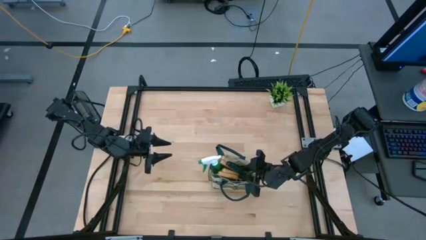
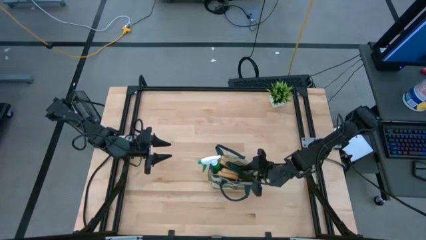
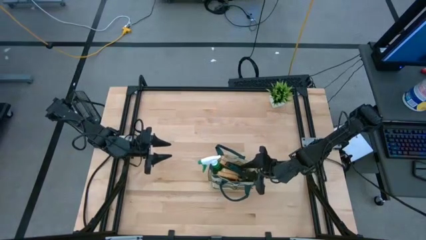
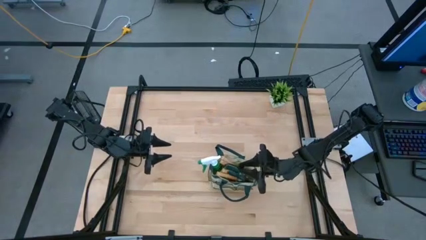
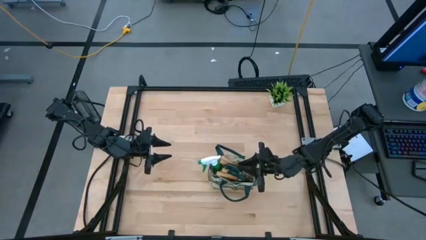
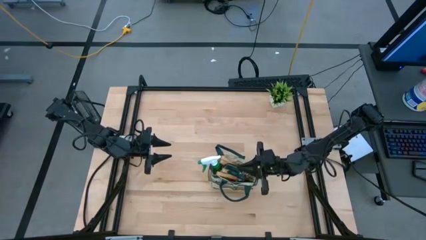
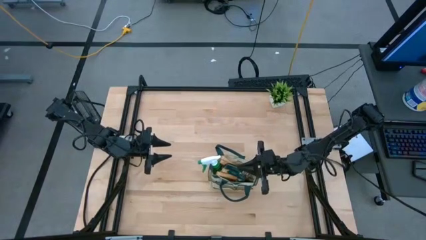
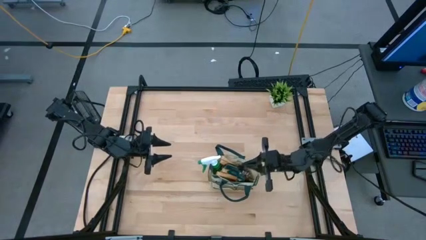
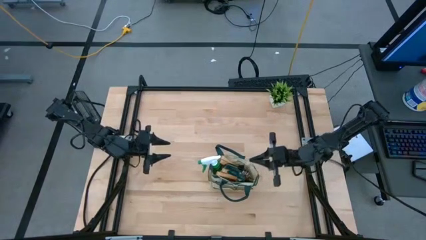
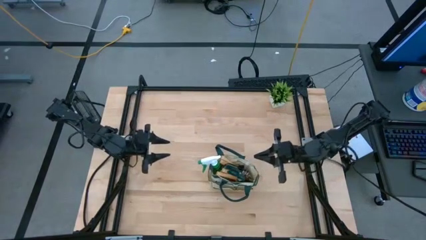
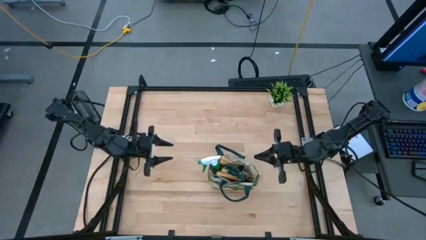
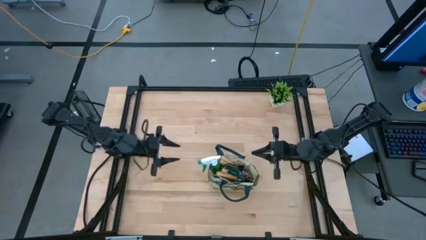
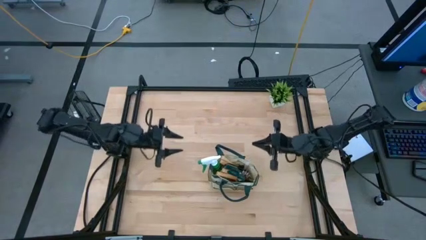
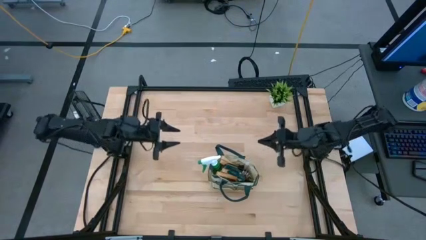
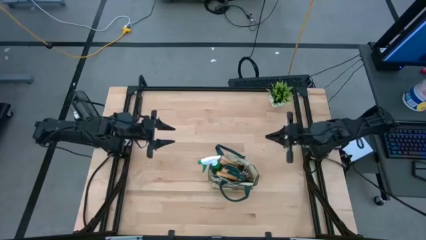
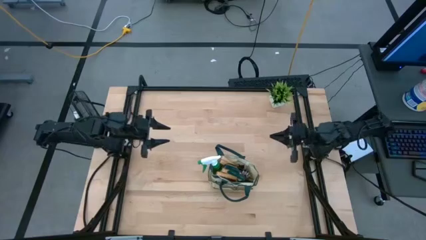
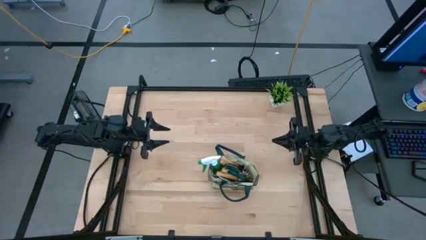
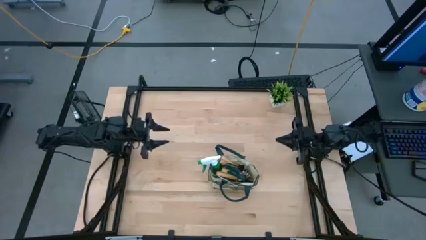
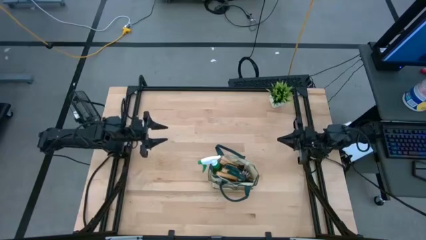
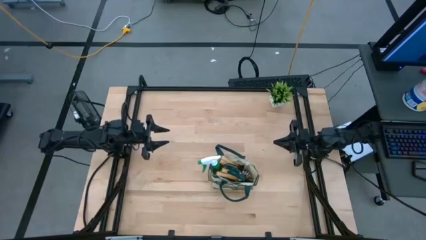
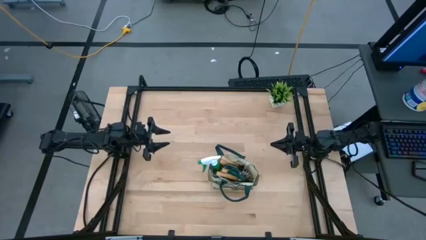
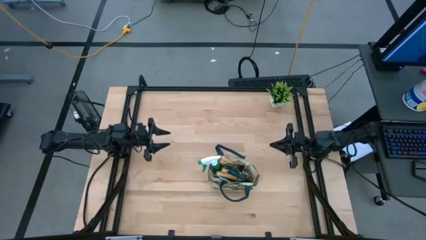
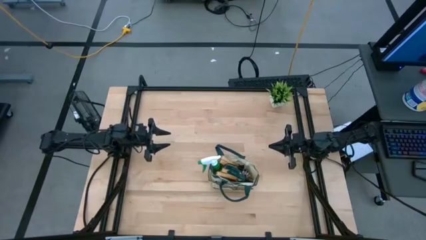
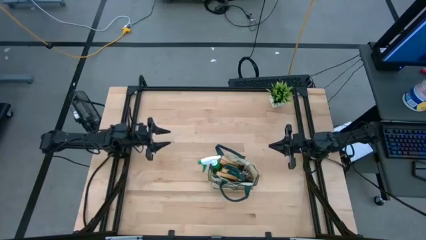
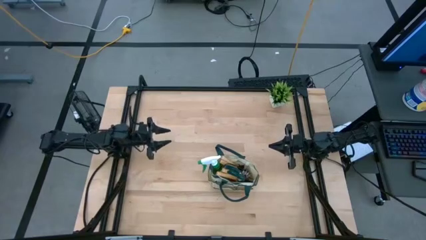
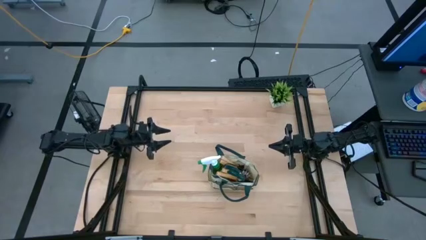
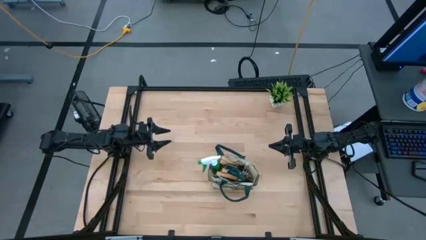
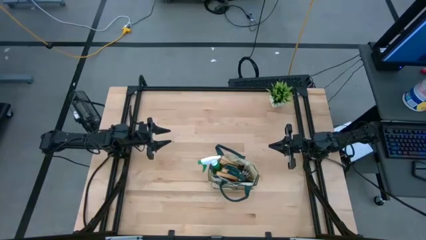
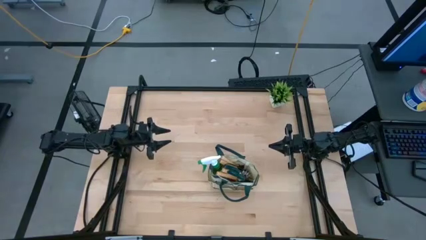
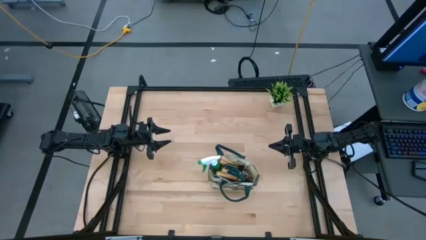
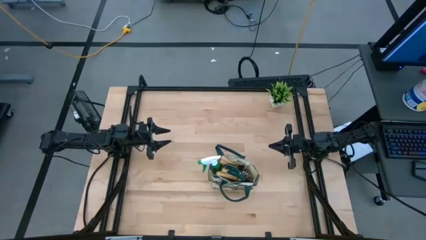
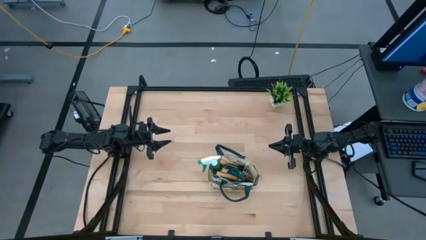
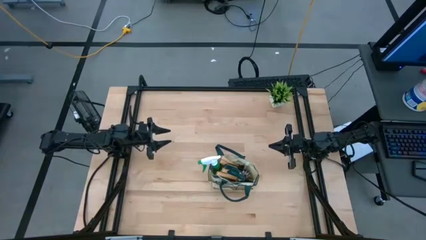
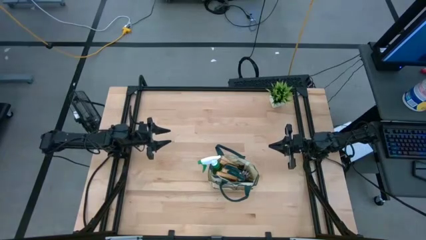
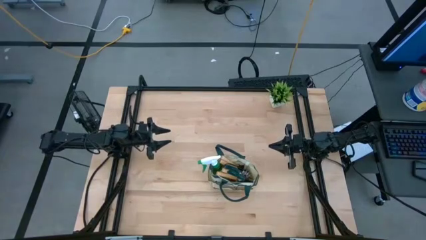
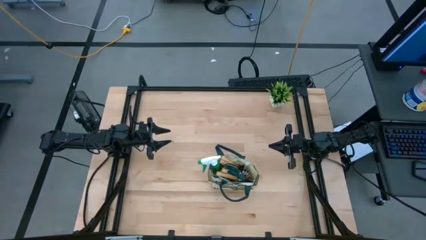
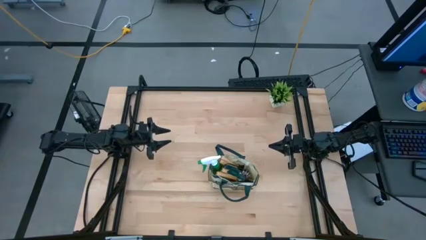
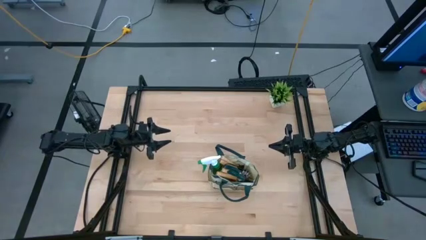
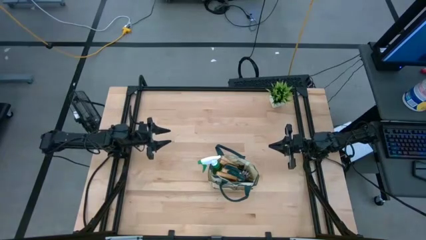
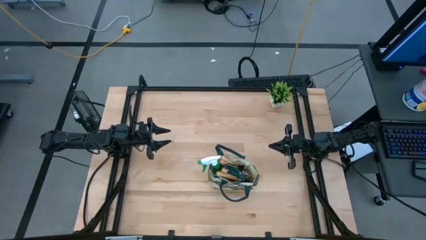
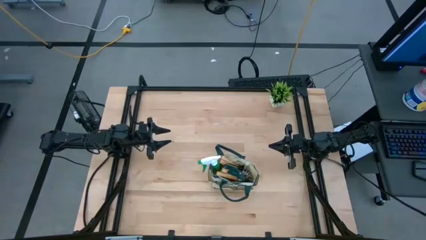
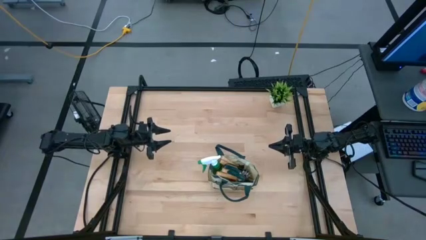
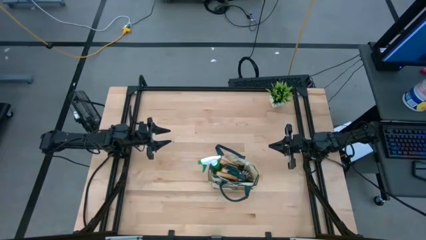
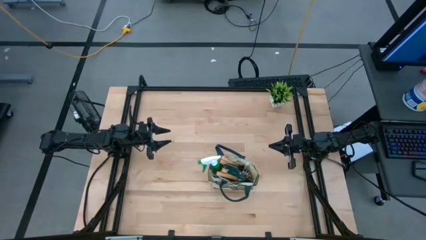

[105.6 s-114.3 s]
Task: Pick & Place Garden tools in Gardening bag
Return to Home Position

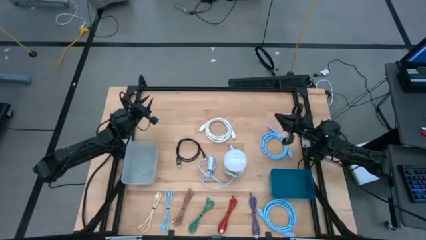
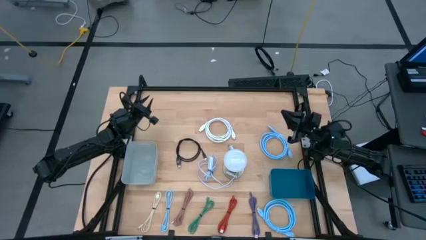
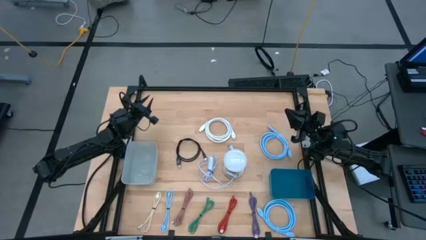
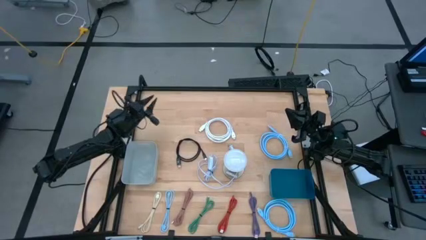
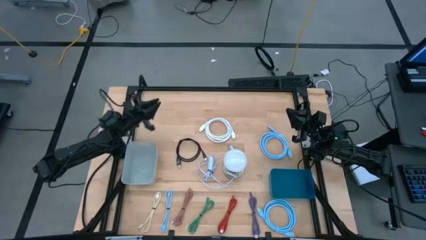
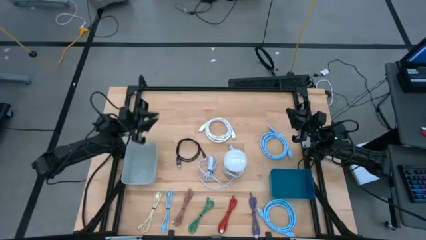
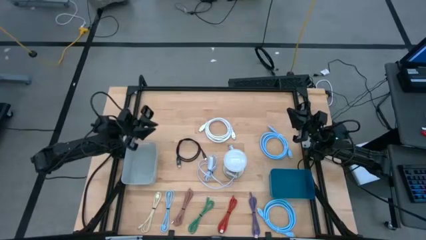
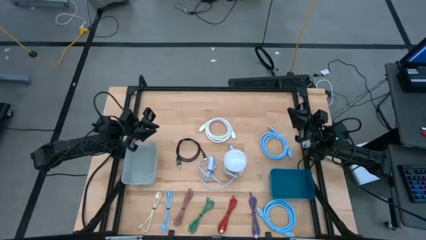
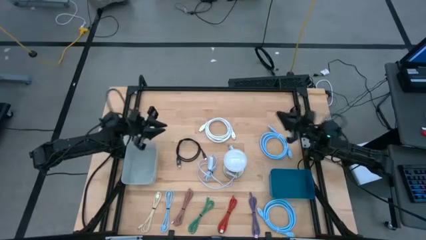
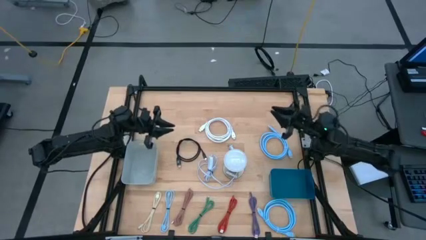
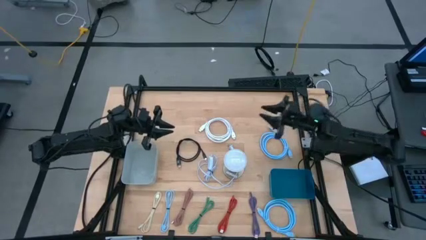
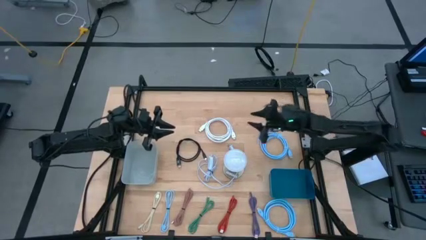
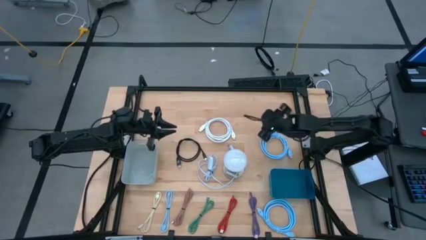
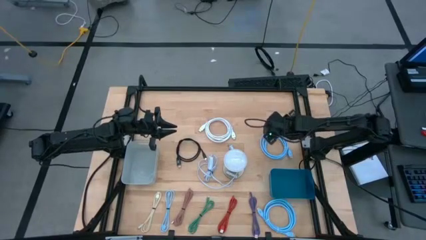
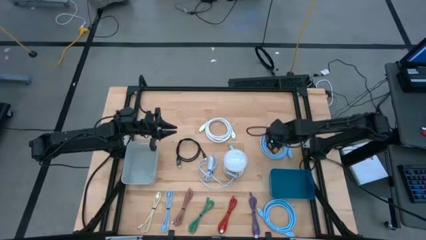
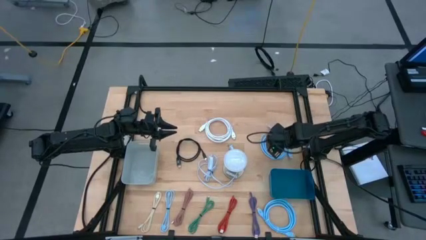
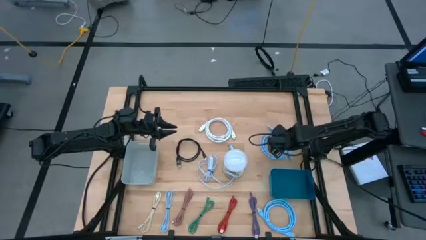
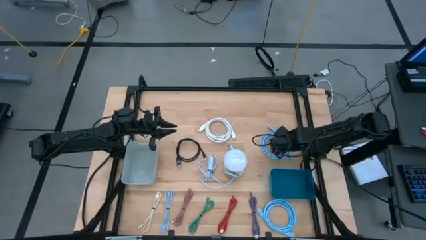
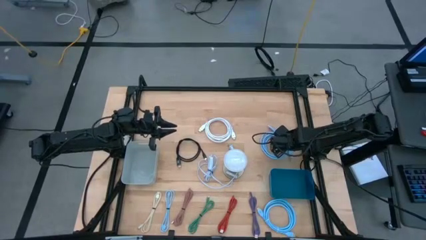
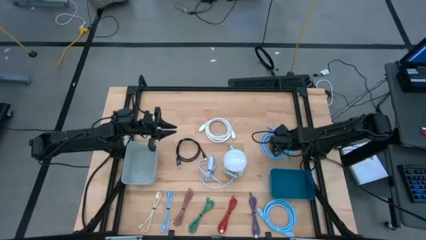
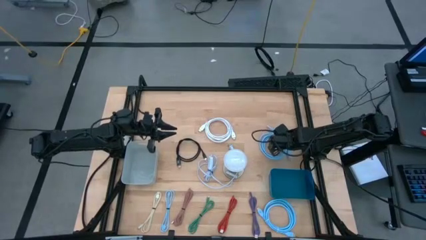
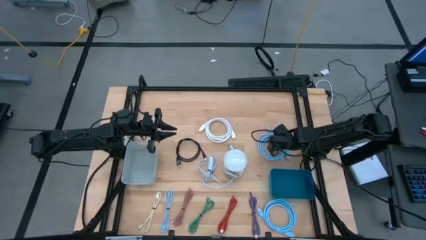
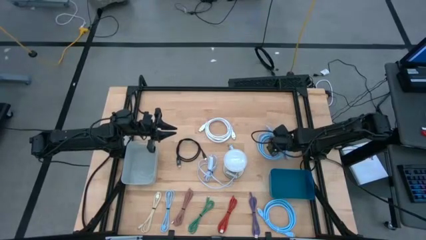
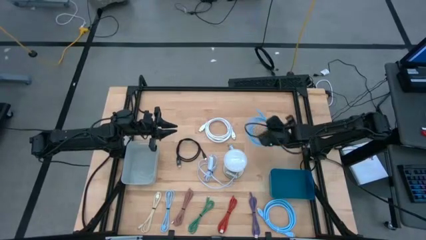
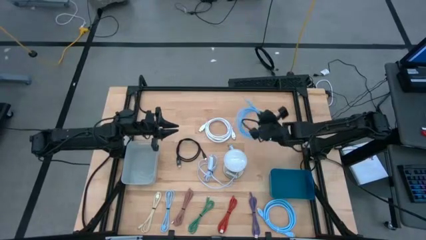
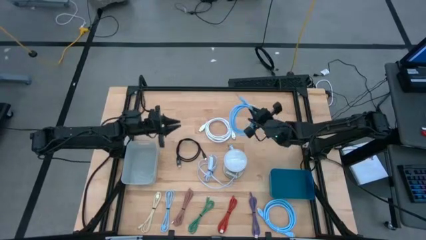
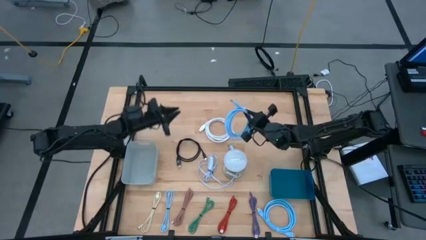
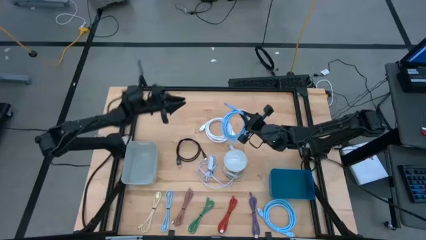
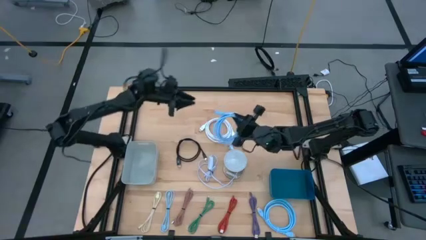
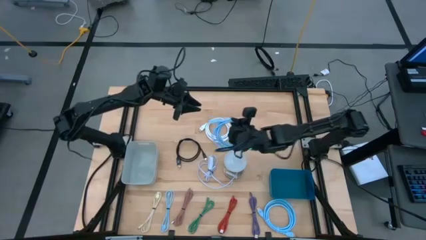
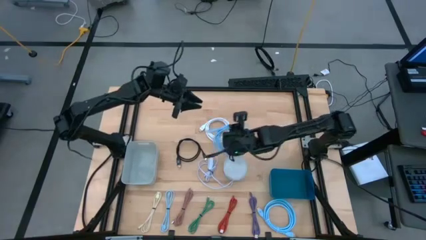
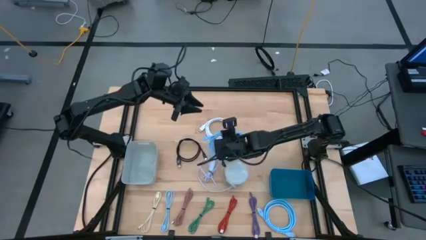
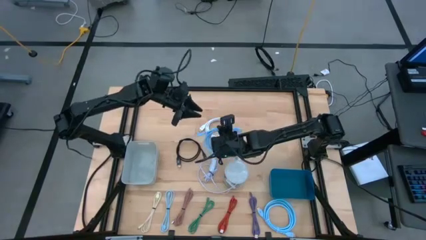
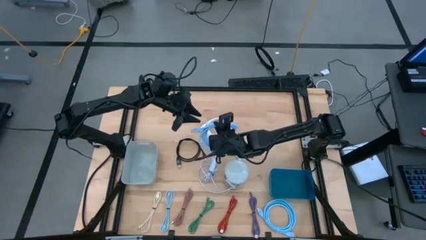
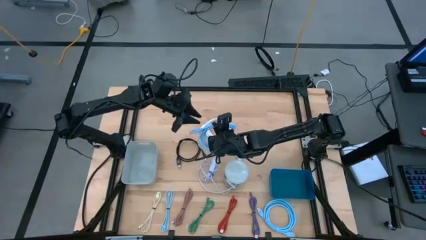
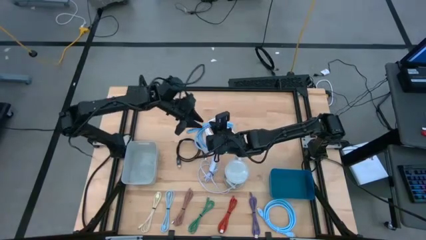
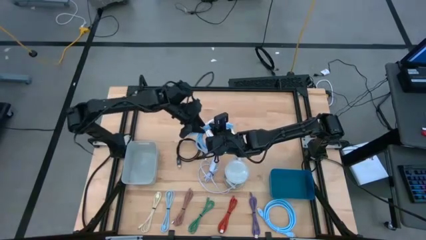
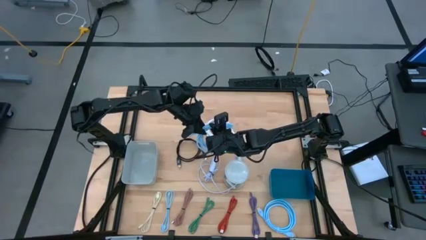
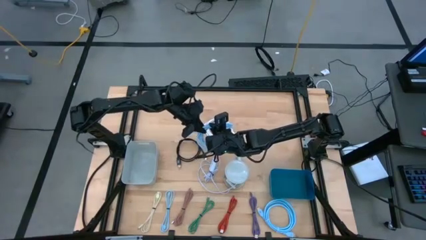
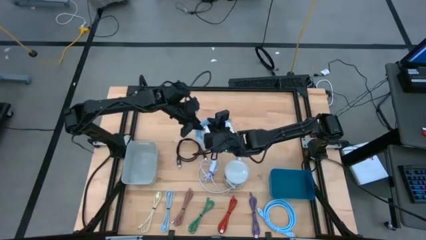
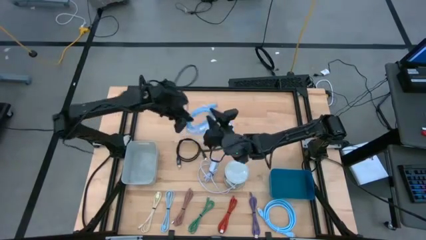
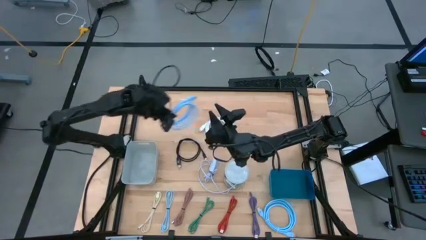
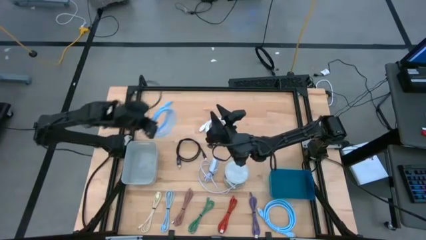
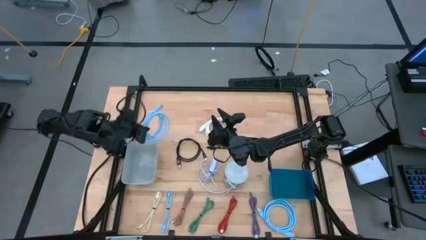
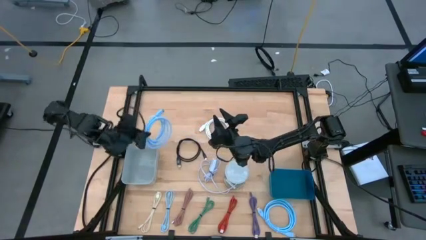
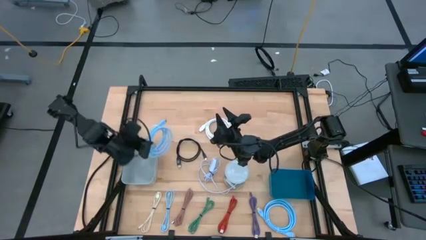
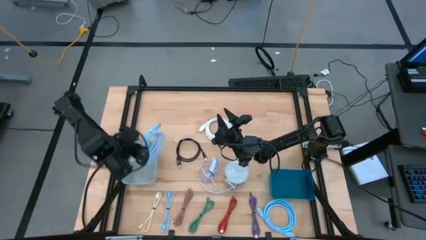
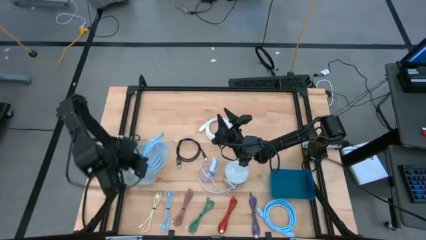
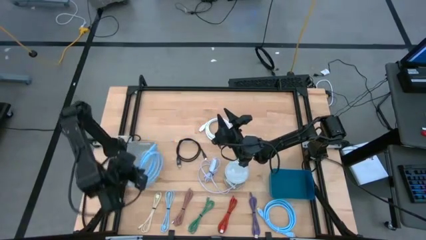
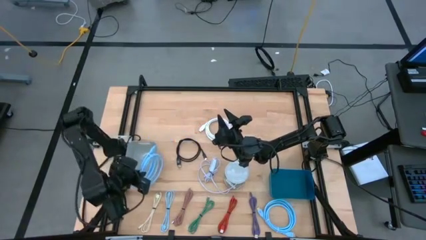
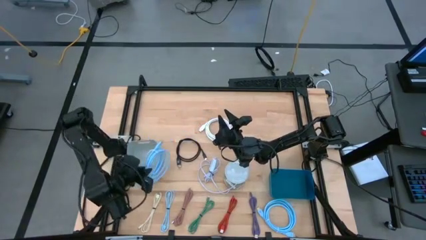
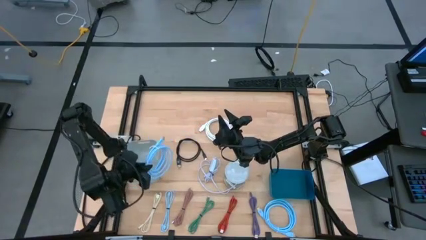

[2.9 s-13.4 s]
Task: Pick & Place USB Port
Put the top light blue HDMI cable into the gray bin
